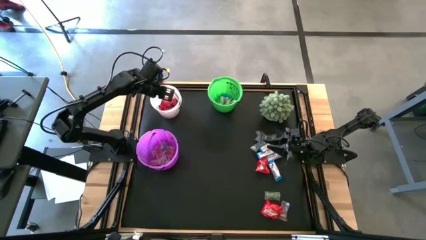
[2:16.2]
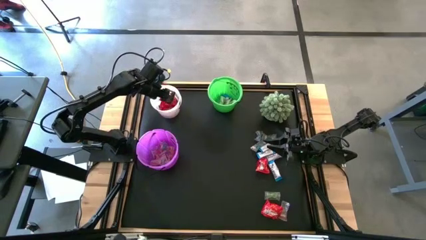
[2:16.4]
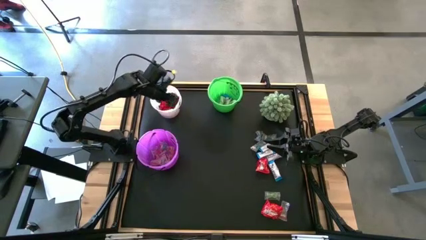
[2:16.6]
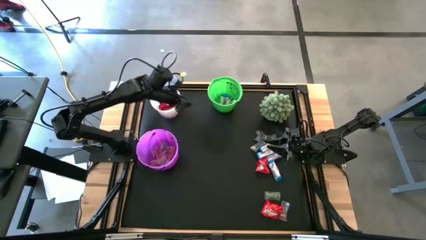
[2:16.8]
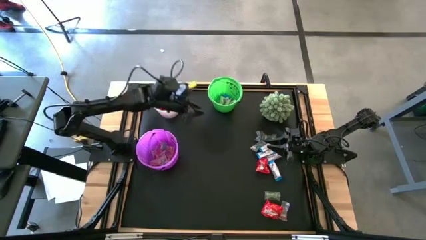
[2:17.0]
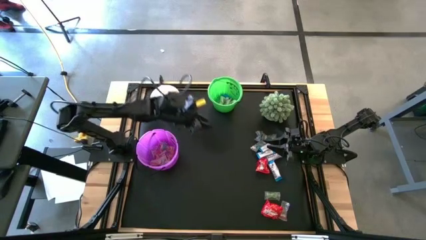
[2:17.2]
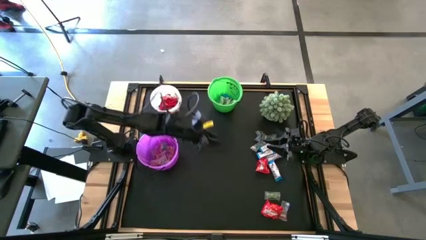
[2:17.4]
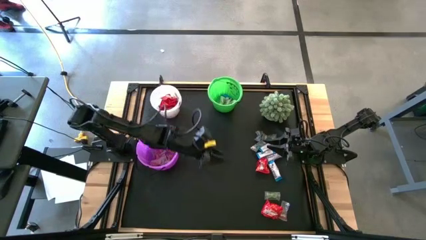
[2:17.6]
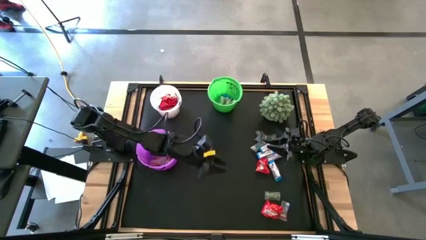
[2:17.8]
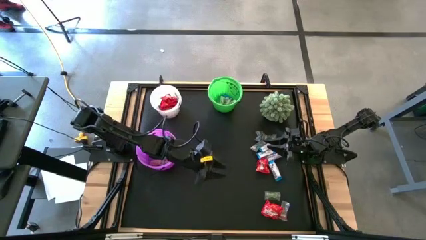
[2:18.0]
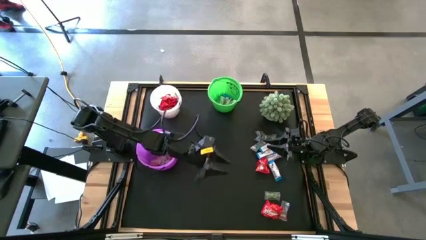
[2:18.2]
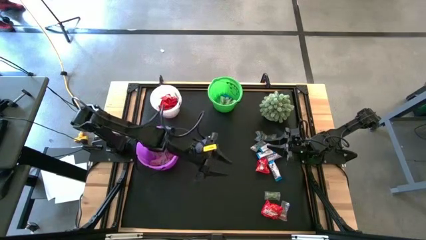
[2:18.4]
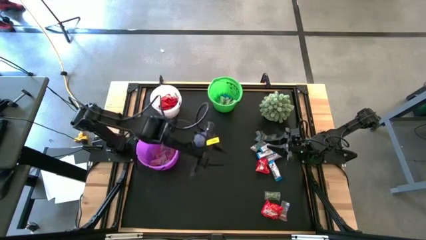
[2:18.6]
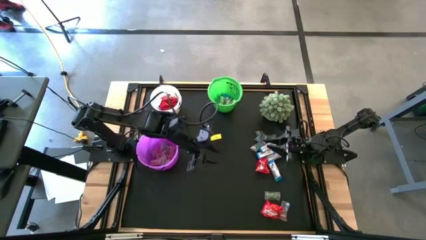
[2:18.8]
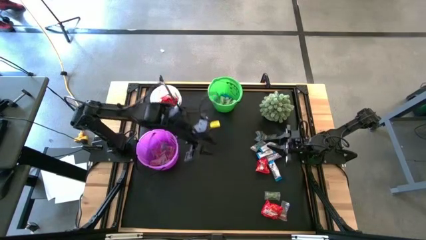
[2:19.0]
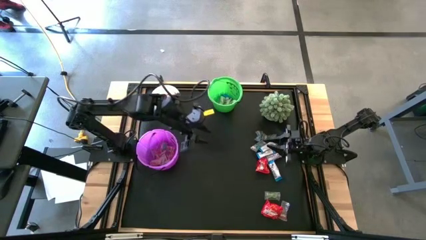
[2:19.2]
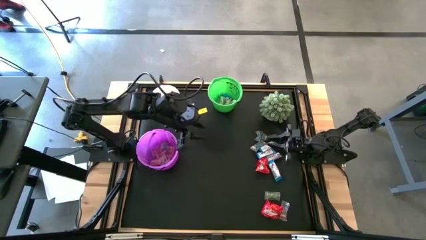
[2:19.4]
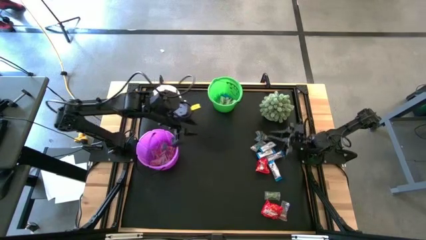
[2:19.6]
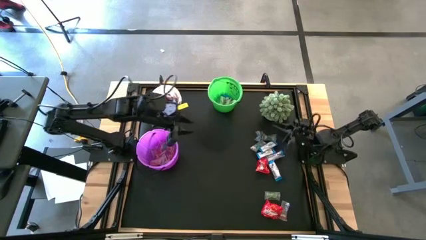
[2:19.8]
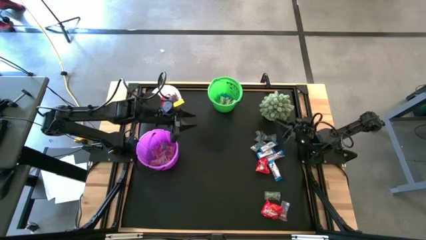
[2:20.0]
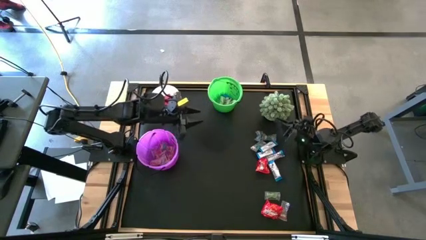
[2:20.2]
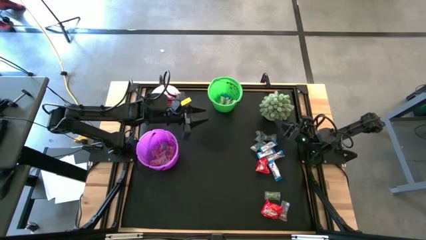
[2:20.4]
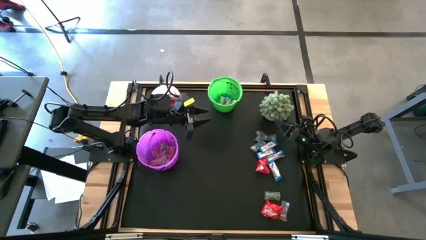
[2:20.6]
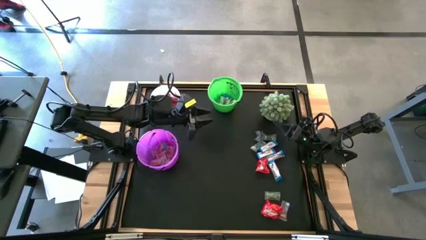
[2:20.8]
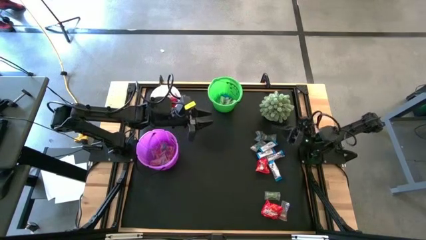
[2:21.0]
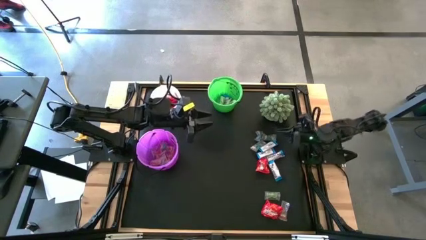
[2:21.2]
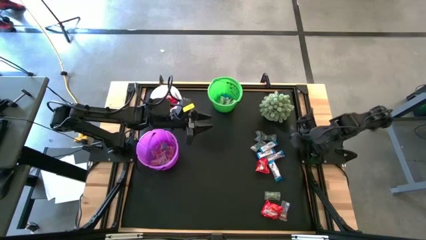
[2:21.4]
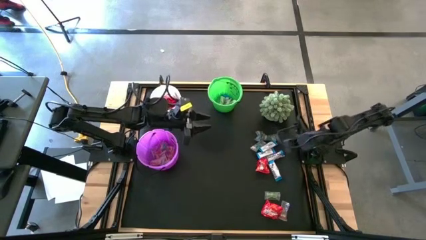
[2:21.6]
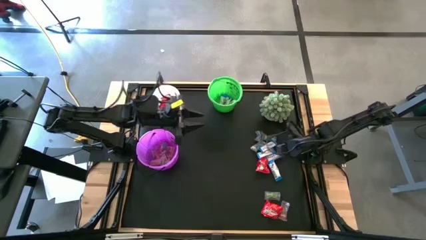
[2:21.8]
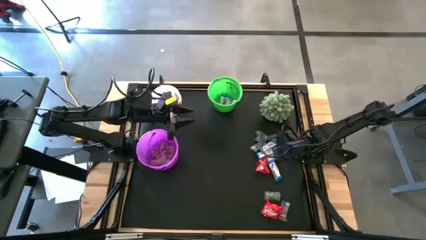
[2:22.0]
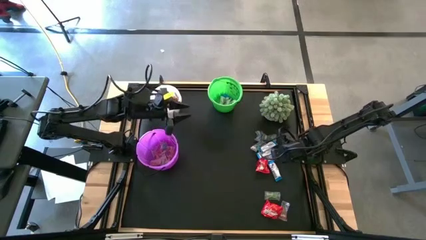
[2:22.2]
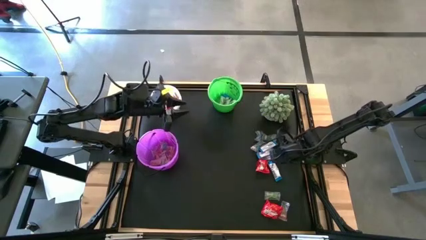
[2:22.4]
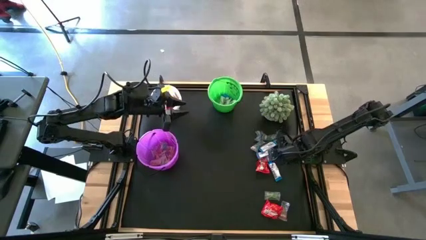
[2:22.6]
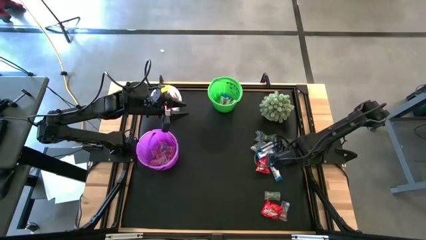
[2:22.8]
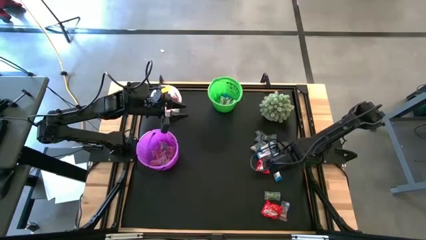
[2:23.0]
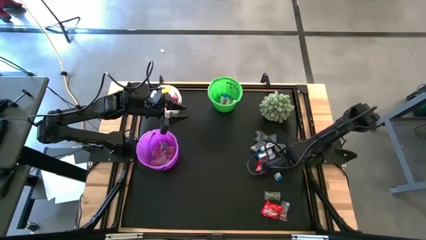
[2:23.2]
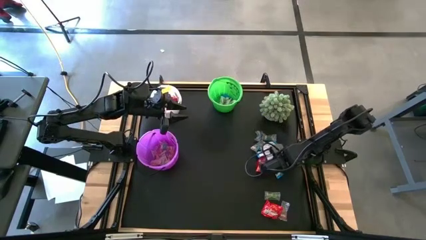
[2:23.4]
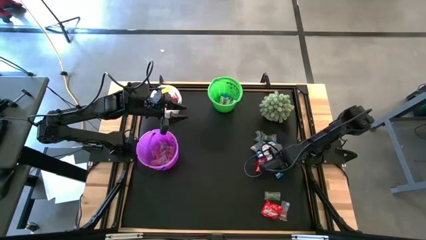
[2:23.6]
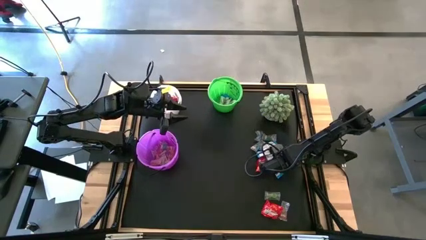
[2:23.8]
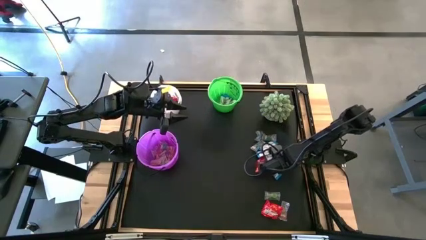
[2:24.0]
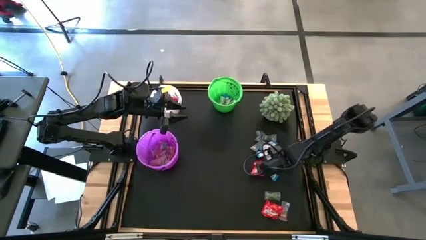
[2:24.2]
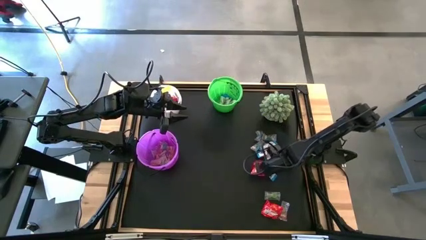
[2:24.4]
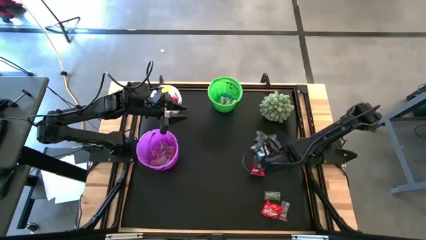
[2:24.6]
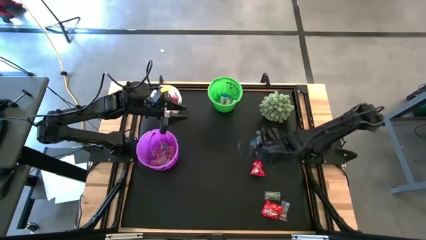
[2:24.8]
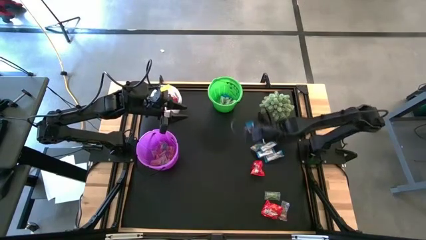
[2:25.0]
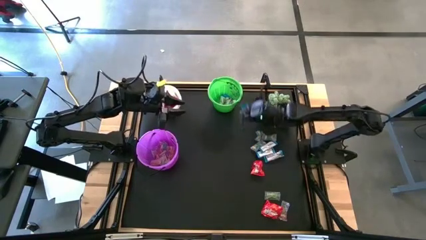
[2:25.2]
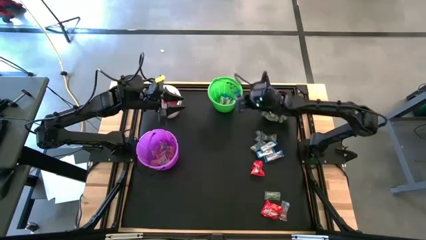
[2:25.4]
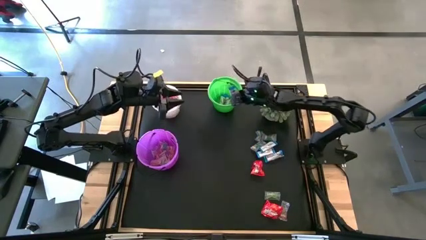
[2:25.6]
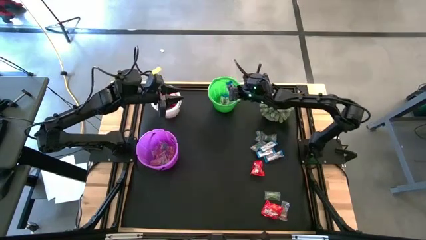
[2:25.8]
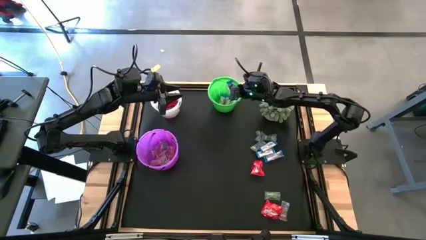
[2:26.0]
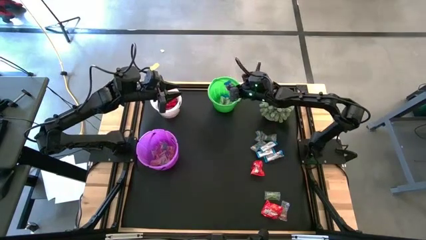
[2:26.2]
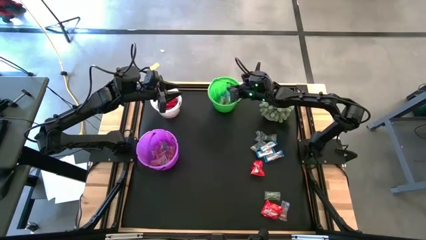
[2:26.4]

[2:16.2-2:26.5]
Task: Sort candy
Put the white chocolate into the green bucket

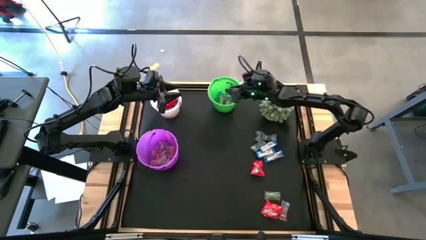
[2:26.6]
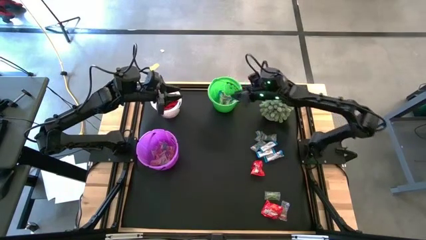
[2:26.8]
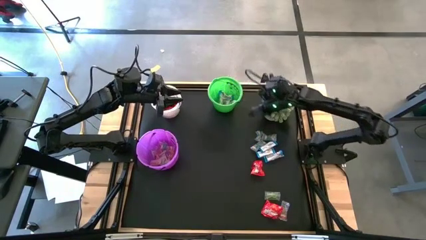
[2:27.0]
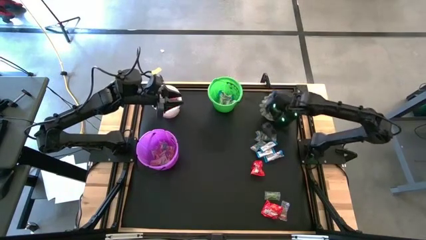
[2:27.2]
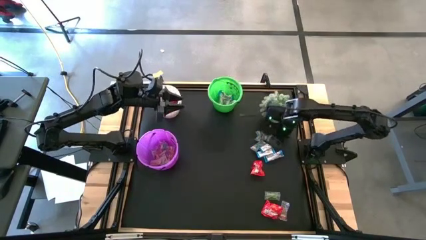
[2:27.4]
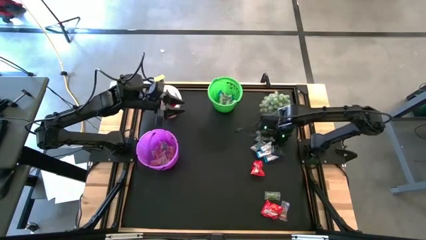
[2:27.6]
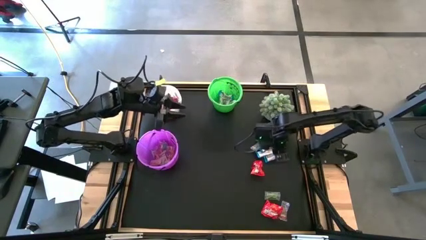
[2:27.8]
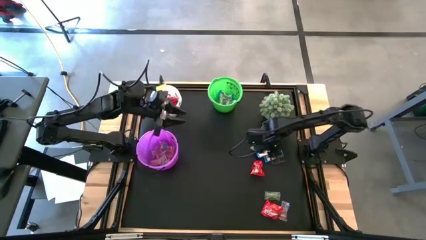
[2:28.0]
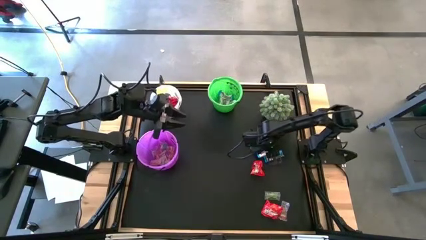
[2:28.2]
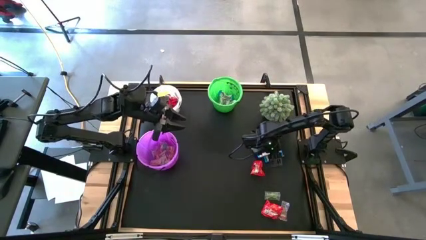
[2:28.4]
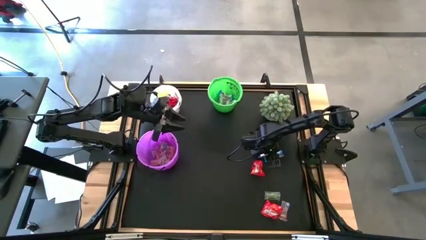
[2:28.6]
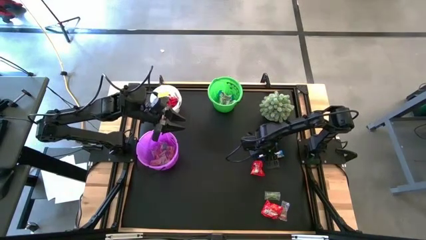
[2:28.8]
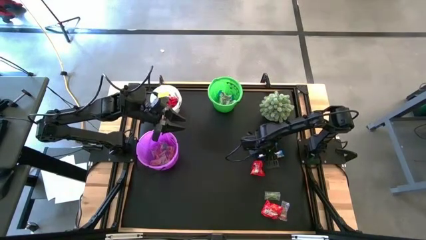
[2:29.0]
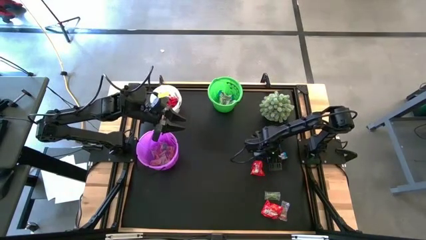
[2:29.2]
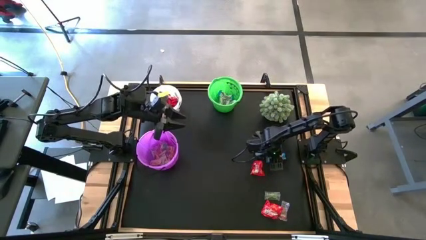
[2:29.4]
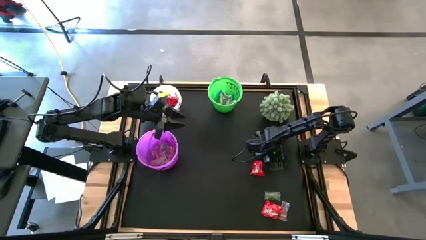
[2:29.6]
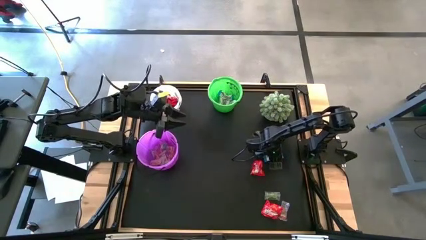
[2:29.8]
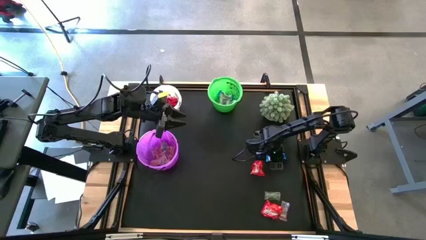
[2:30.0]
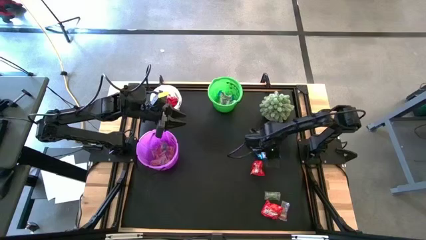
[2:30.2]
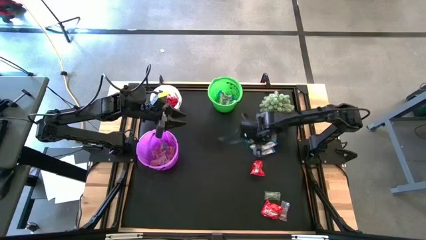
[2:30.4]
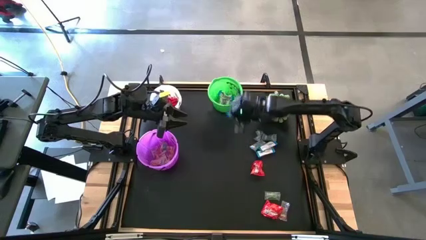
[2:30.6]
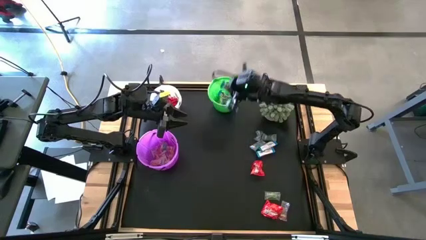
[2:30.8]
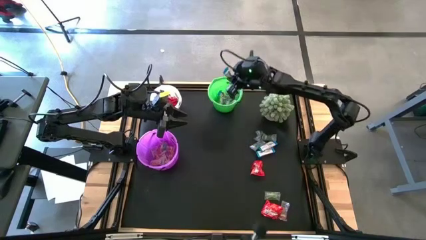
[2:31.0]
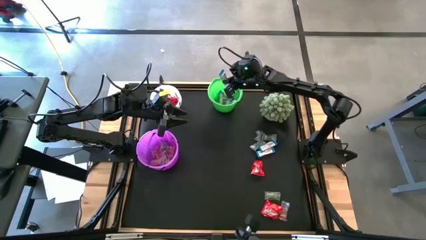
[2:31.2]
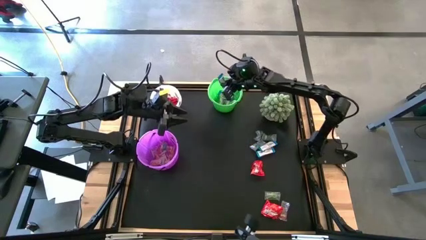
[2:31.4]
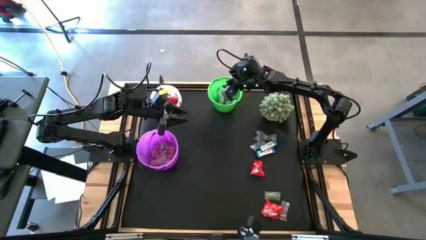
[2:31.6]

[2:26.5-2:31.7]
Put the white chocolate into the green bucket
